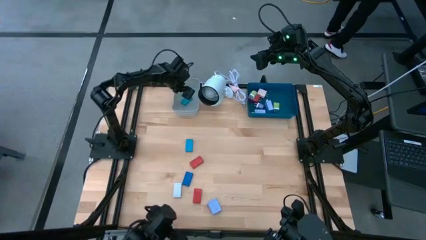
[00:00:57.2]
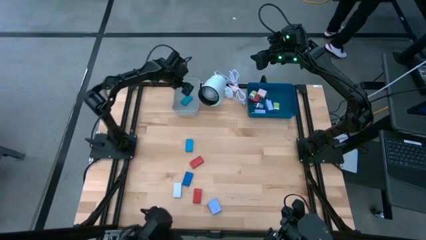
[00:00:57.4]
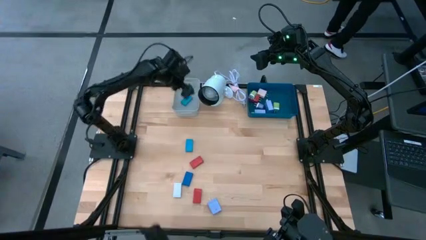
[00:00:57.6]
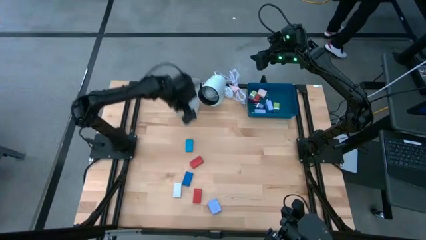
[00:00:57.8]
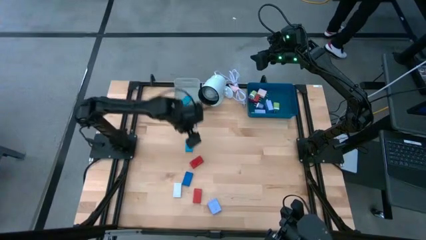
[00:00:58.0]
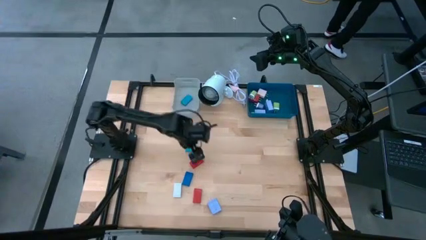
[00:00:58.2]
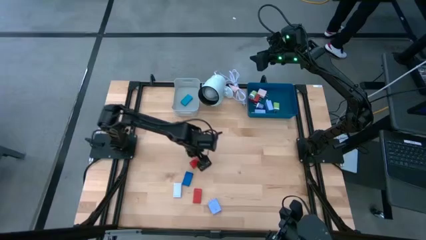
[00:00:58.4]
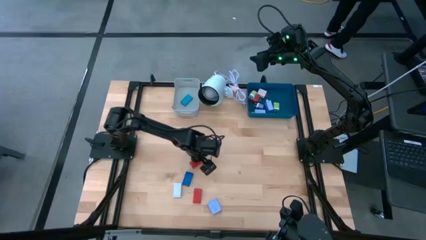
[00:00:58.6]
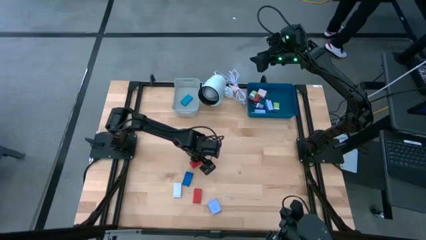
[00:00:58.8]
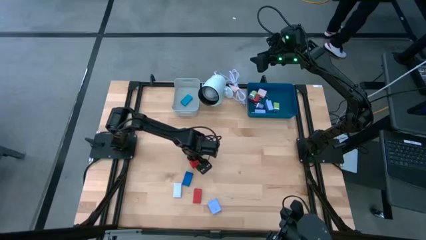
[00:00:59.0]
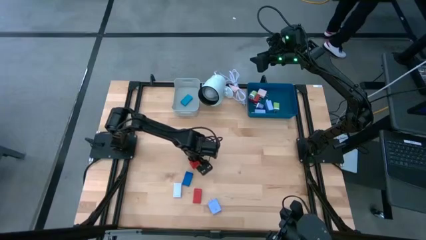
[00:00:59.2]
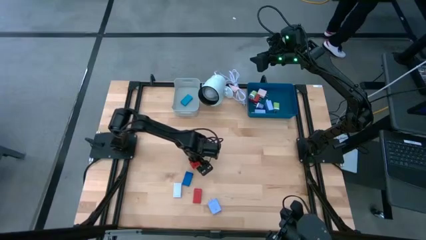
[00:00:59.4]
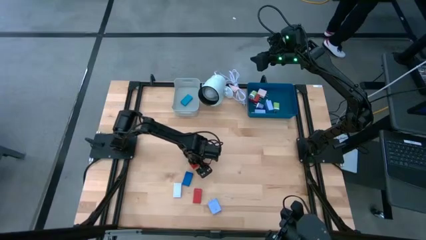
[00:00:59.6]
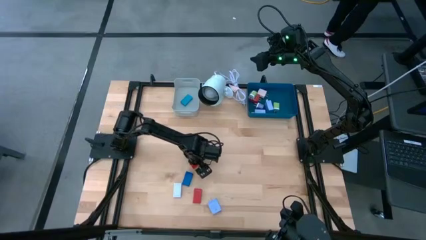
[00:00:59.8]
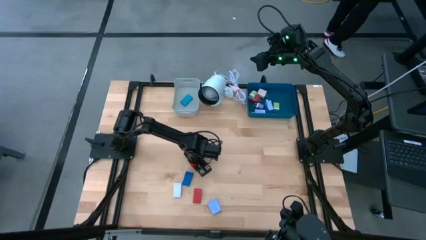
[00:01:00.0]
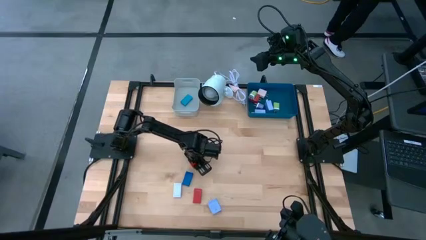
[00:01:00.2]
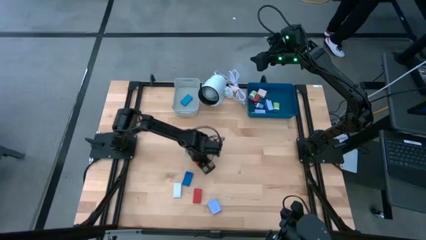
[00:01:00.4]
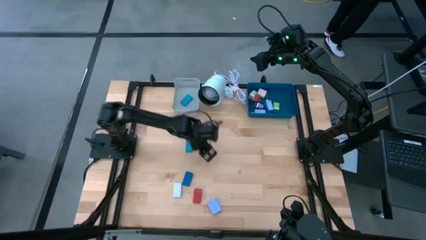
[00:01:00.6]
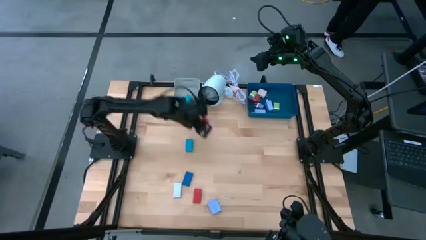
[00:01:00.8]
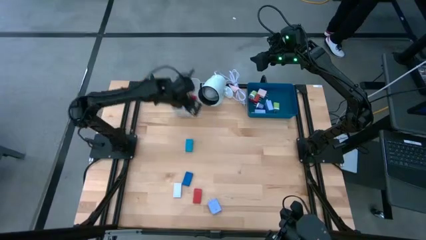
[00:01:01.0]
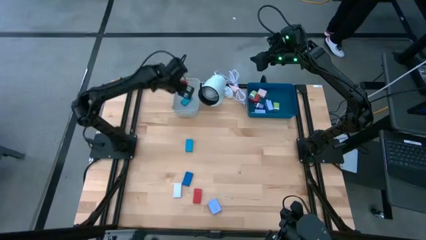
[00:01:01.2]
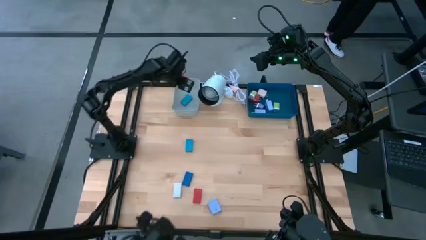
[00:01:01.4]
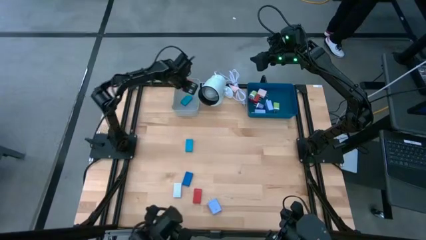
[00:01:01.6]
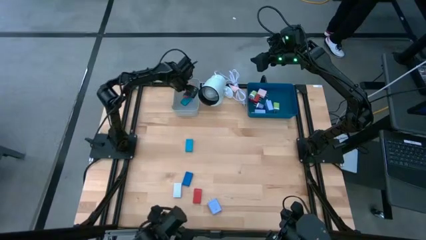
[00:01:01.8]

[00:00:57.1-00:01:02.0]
Task: Pick & Place Office items
Put the top red timer into the gray bin

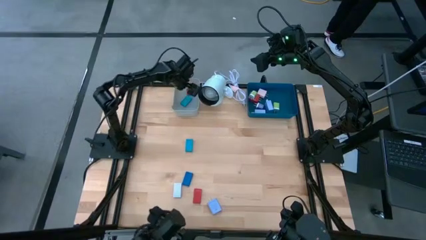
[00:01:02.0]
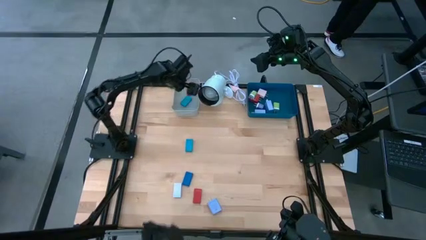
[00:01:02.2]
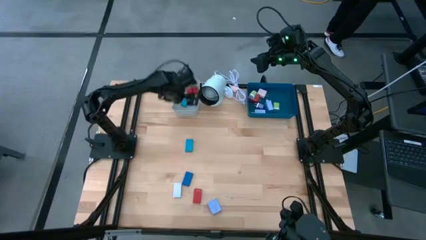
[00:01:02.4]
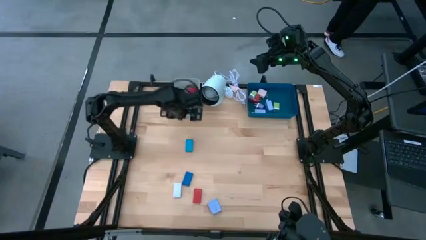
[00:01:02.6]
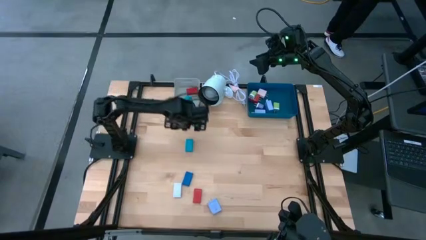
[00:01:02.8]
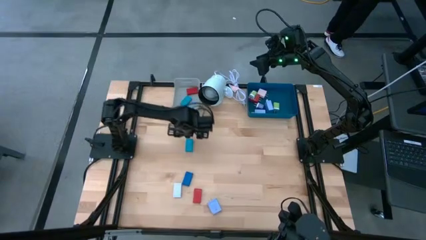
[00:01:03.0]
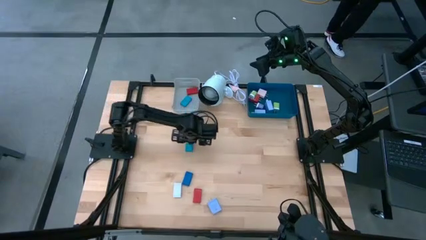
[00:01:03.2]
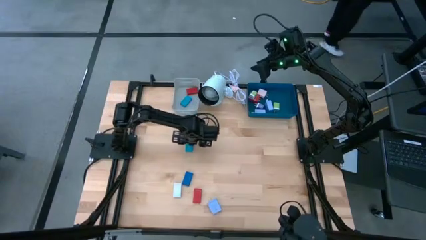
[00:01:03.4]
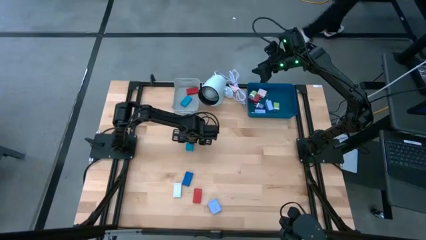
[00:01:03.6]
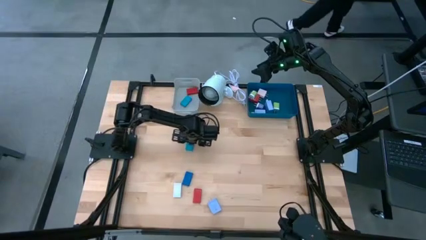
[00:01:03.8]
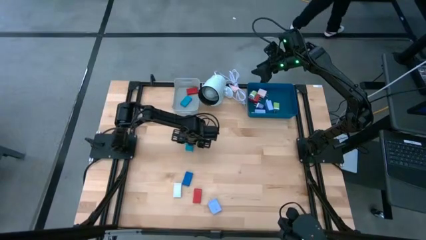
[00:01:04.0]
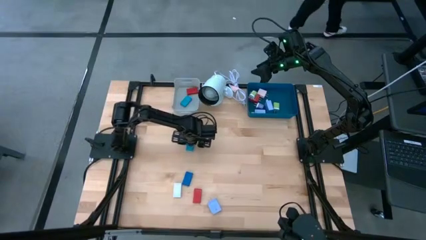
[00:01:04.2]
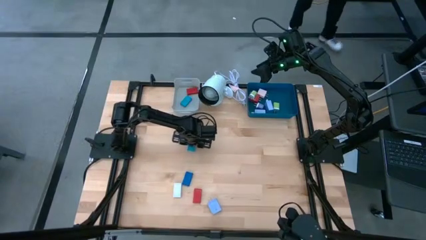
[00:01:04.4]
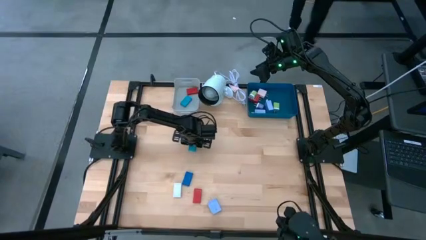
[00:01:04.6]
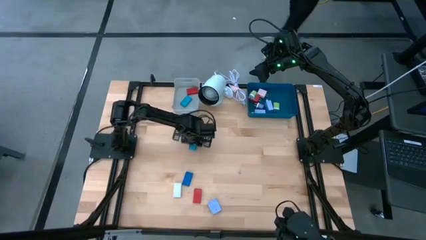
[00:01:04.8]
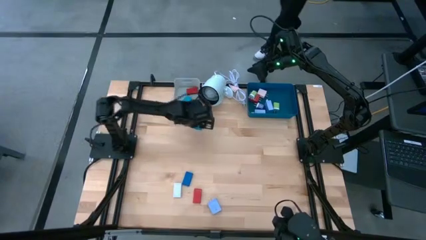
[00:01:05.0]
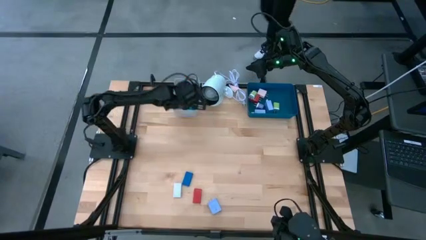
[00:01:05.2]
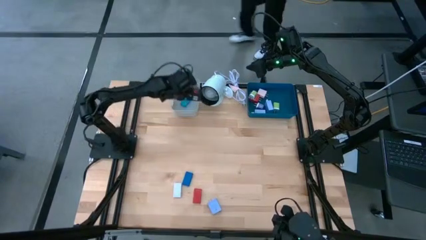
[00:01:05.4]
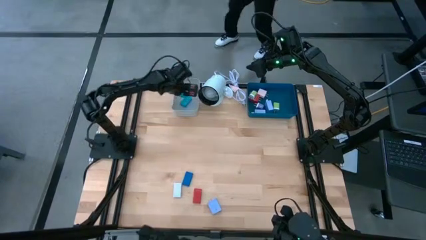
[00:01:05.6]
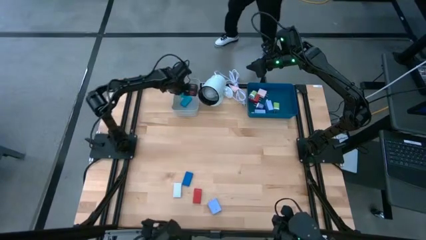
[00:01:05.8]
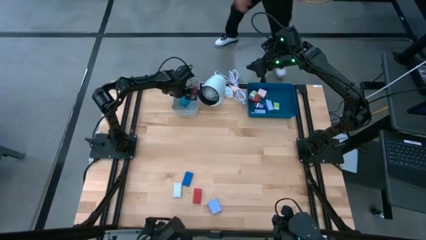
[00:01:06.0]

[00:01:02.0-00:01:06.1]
Put the blue timer into the gray bin

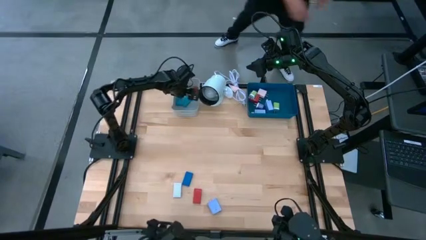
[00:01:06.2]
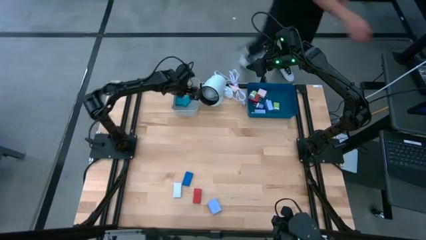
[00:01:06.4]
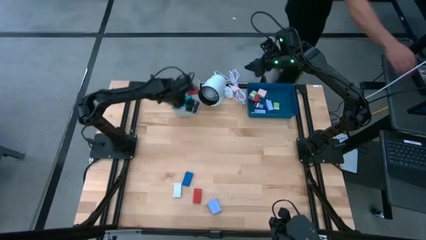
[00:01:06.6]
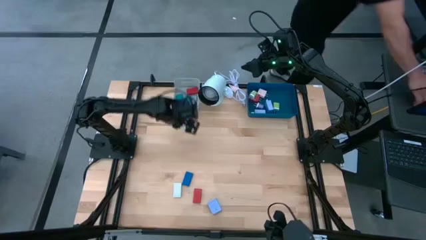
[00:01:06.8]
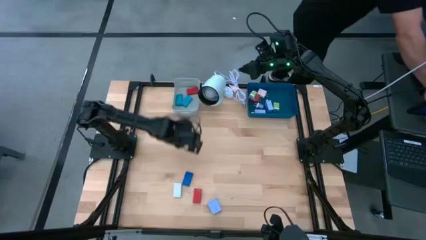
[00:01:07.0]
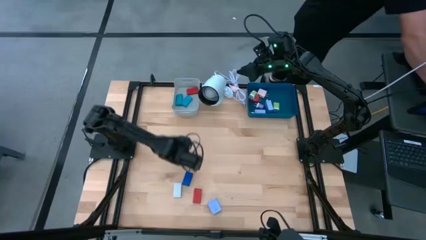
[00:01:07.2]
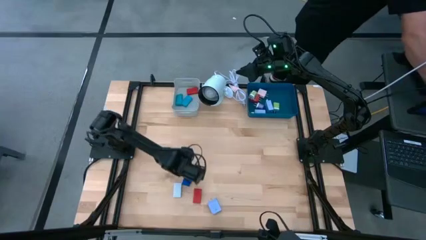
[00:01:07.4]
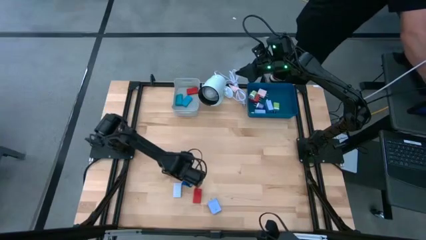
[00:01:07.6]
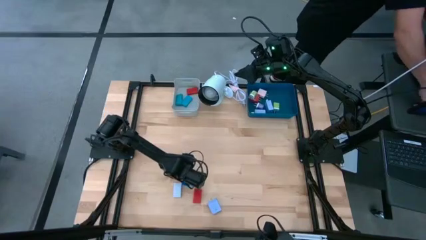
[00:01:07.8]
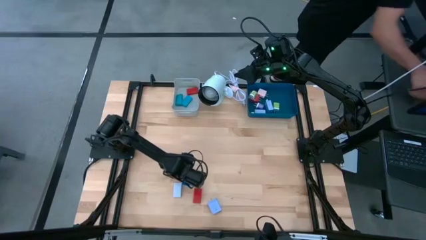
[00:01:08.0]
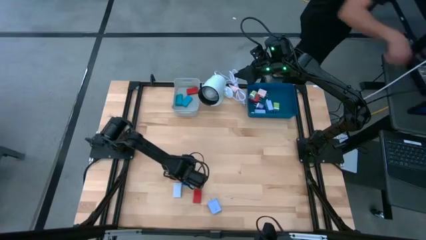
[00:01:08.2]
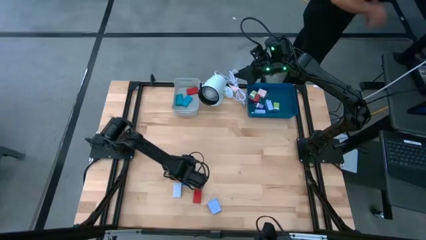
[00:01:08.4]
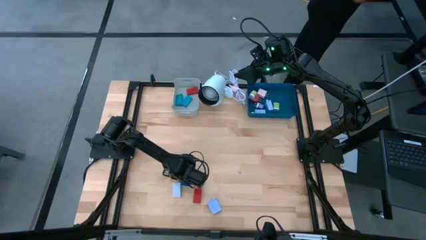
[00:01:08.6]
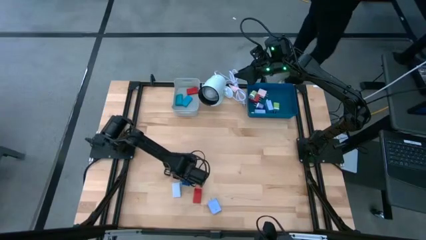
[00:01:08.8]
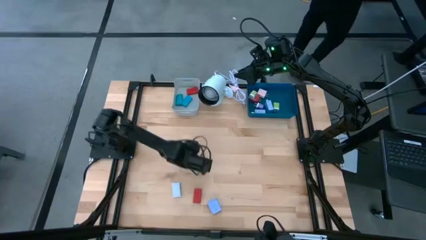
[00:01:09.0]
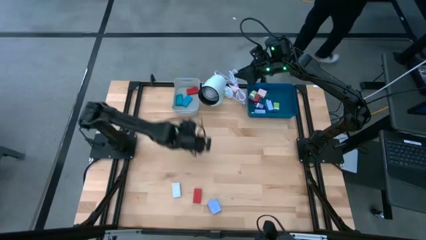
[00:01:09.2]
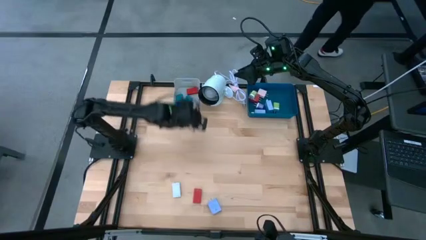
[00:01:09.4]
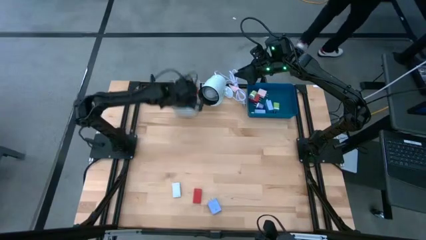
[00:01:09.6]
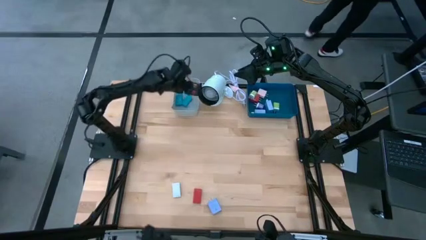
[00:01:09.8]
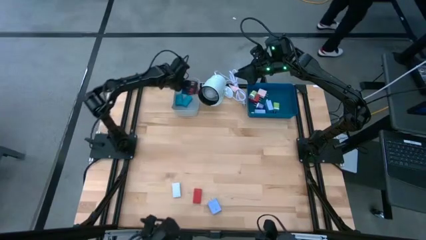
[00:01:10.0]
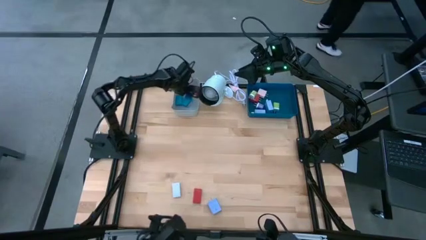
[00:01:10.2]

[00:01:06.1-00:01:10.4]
Put the dark blue timer into the gray bin

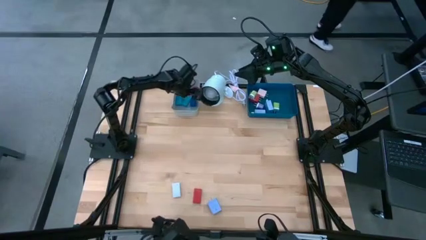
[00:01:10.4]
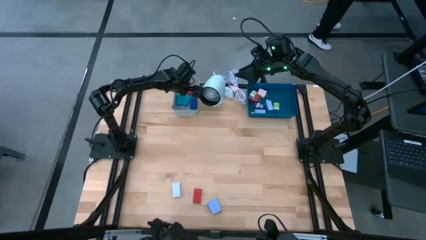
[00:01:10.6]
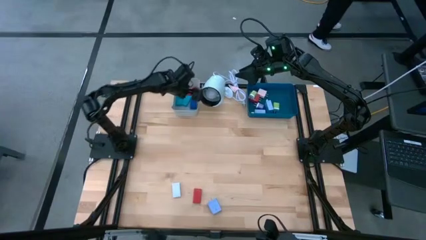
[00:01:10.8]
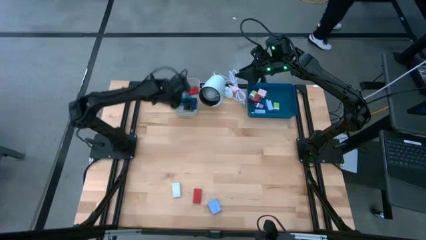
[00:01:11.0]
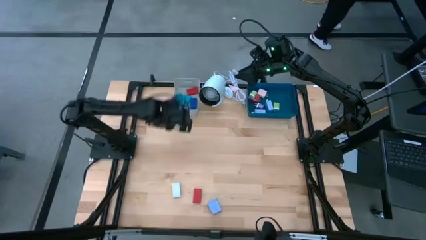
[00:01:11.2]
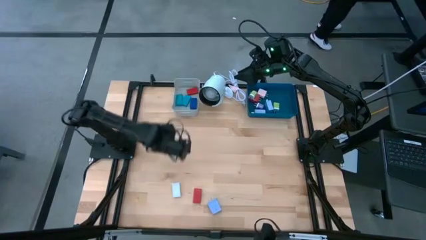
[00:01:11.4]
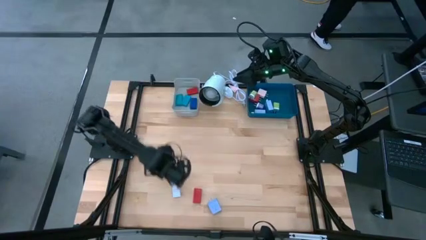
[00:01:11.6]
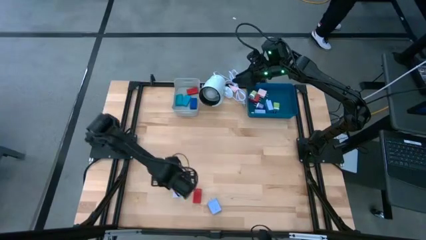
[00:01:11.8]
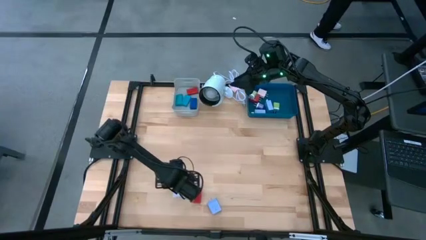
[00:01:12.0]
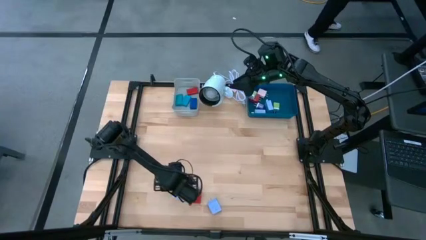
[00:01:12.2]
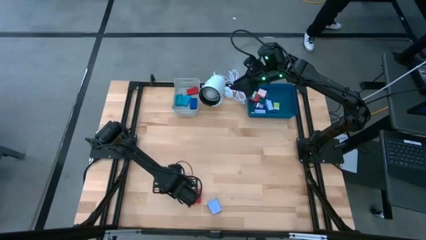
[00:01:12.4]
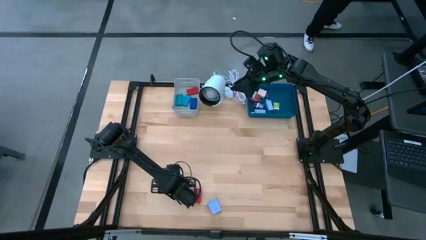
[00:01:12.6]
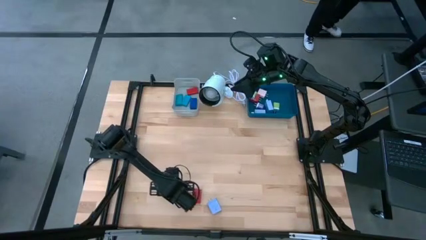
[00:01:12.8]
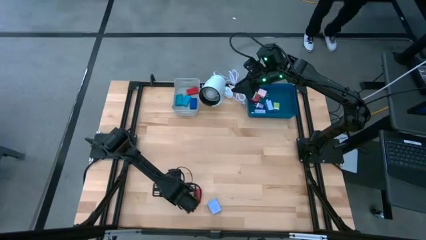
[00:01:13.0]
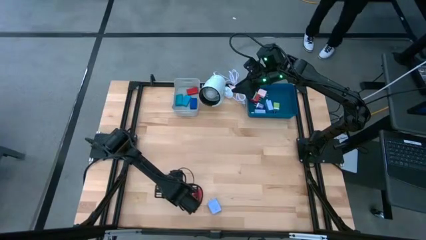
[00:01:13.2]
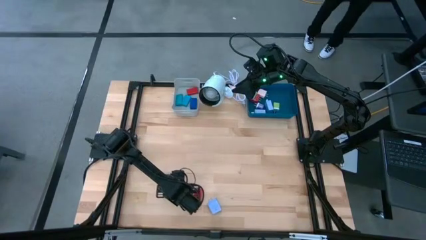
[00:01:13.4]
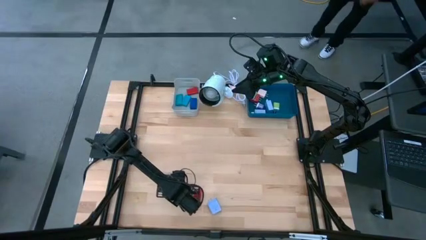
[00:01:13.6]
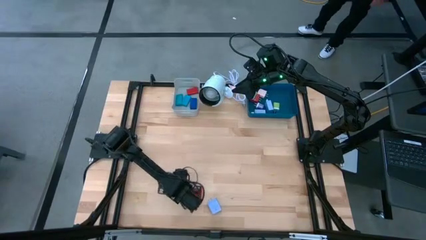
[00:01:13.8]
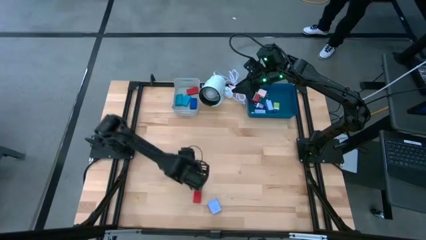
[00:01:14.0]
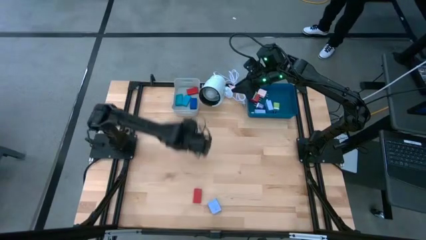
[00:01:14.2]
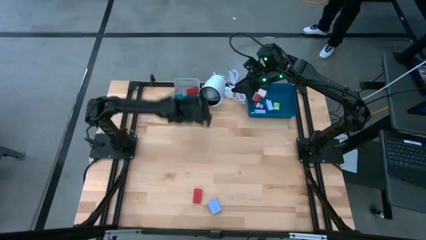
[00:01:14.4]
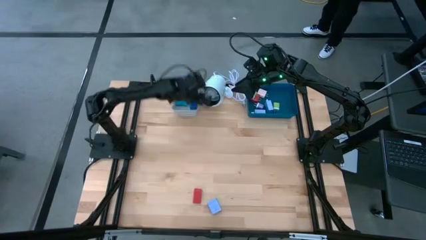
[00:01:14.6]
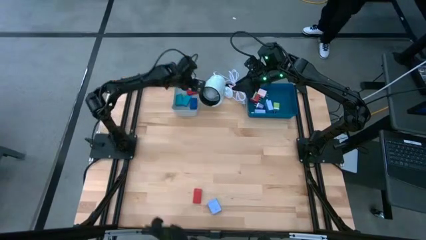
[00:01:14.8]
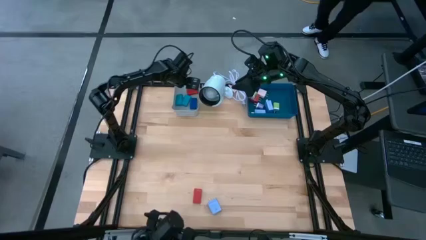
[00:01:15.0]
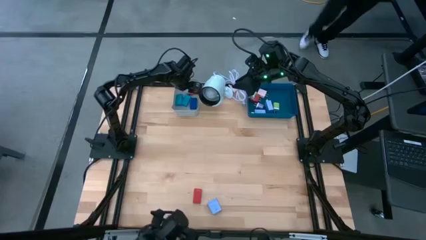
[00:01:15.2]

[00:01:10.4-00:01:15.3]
Put the white timer into the gray bin
